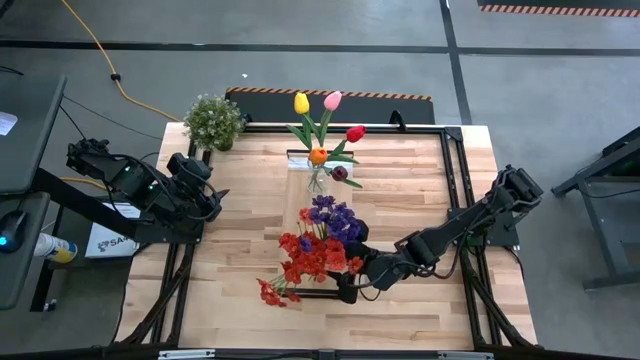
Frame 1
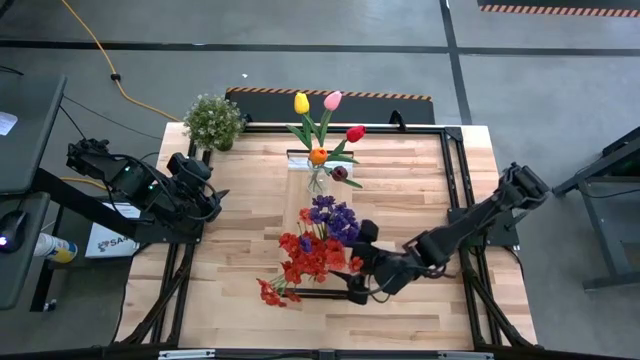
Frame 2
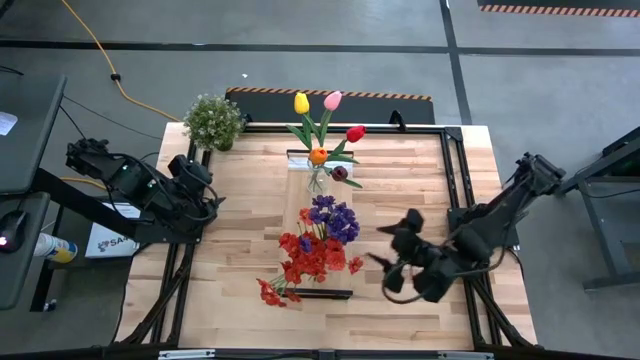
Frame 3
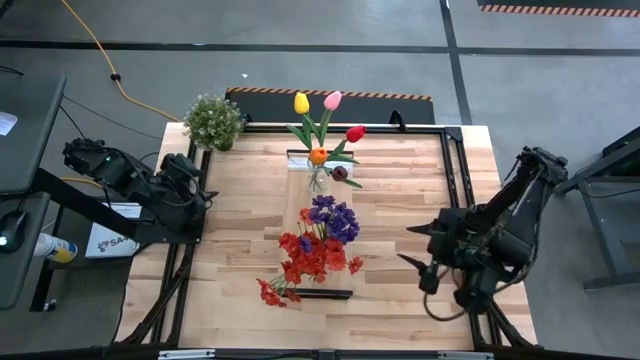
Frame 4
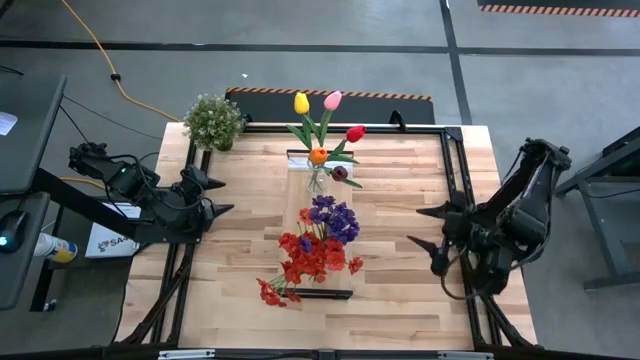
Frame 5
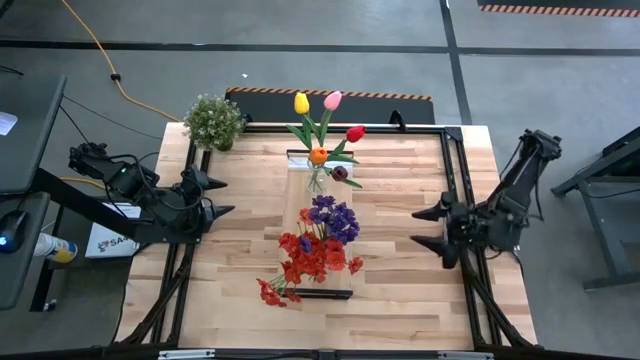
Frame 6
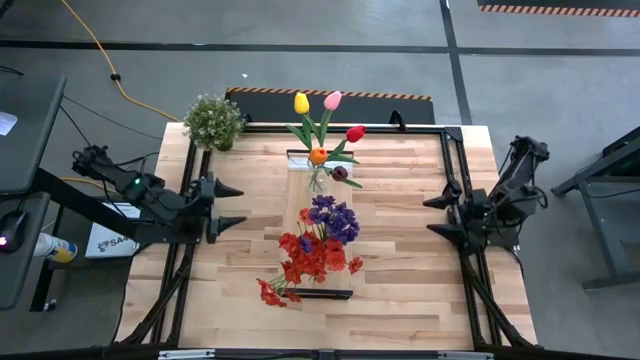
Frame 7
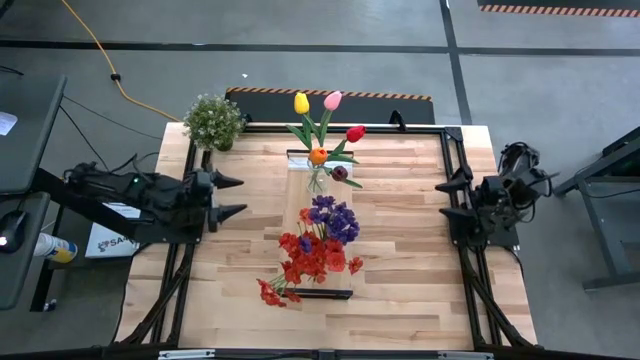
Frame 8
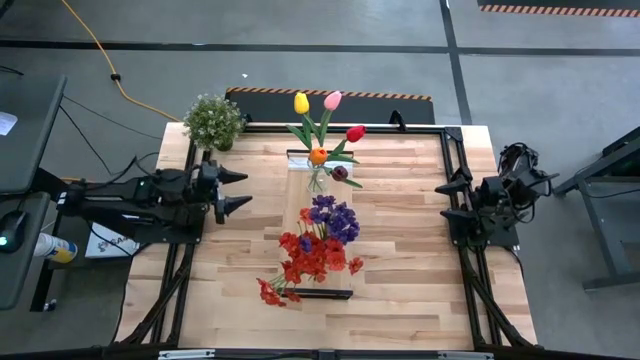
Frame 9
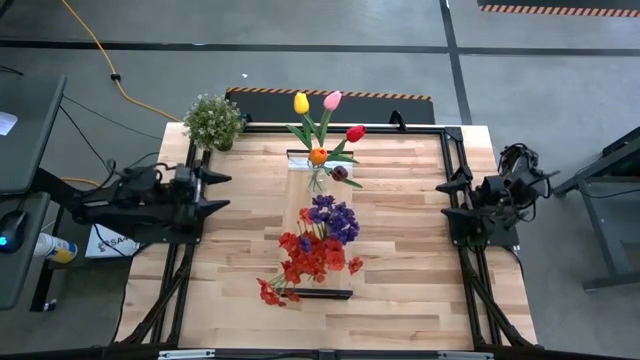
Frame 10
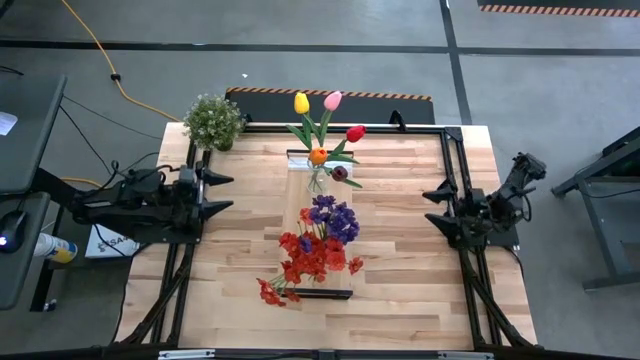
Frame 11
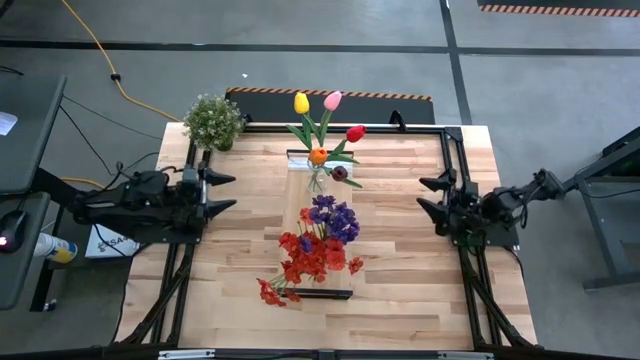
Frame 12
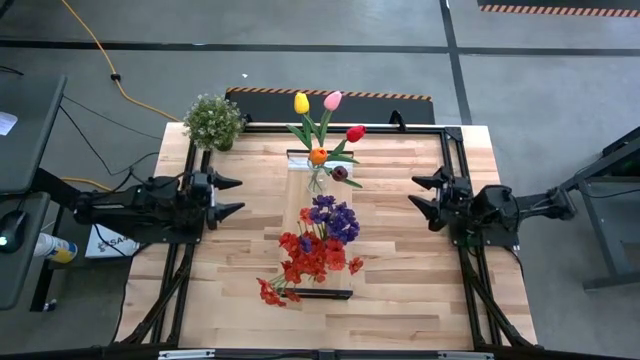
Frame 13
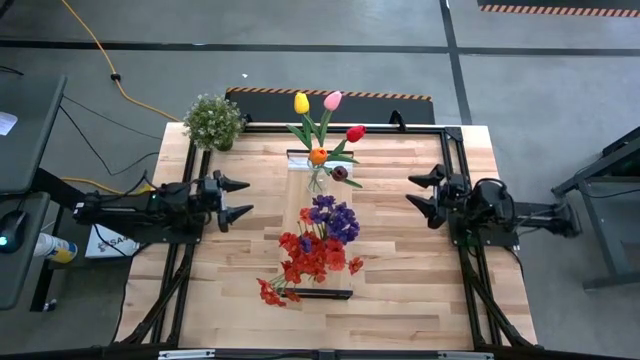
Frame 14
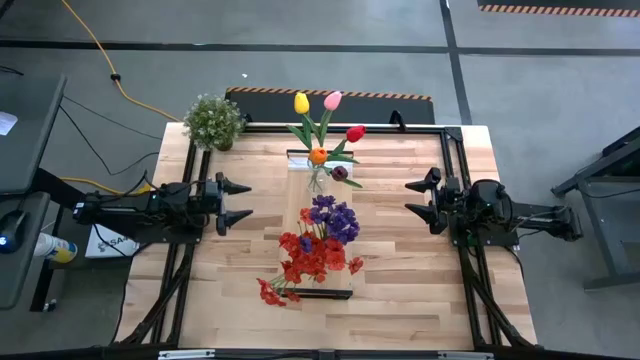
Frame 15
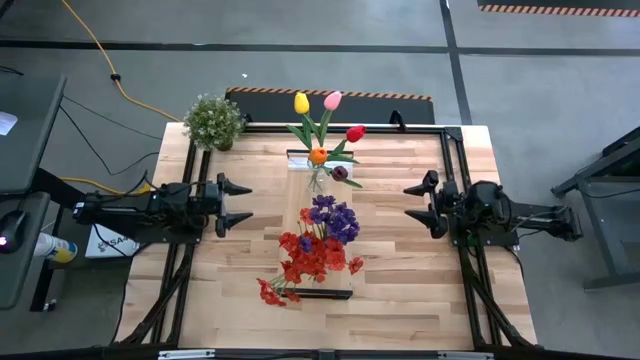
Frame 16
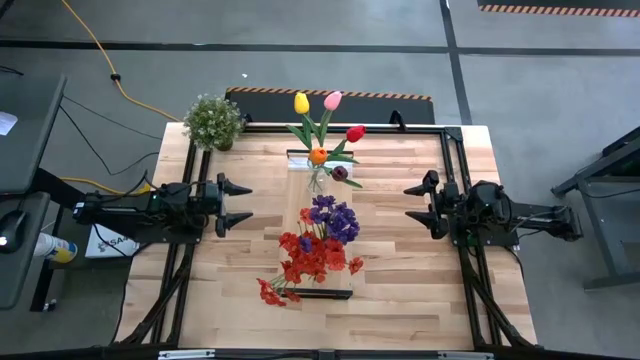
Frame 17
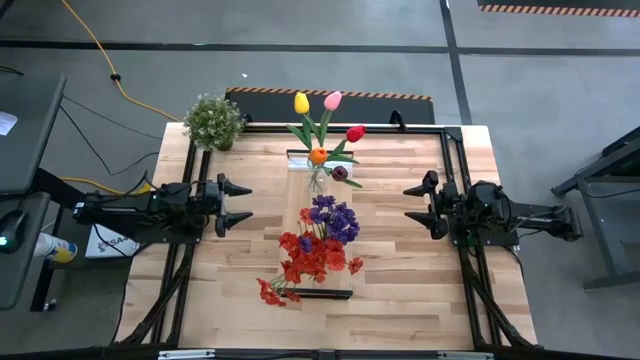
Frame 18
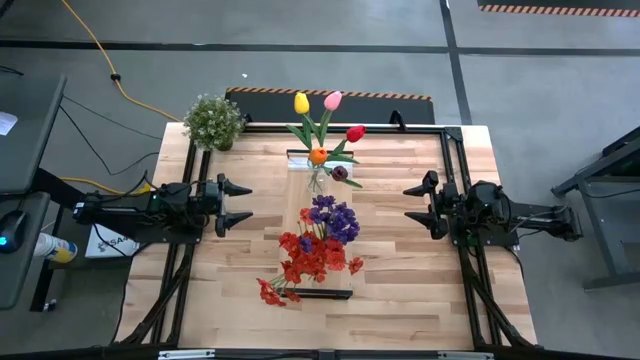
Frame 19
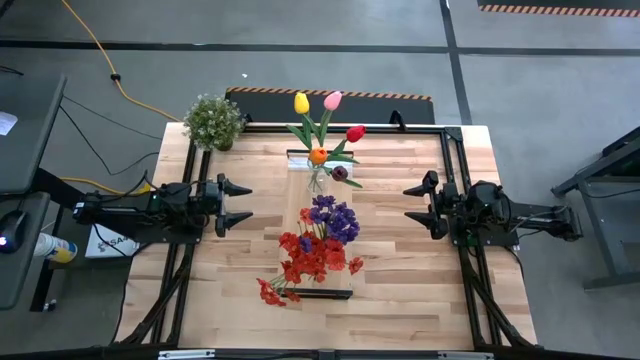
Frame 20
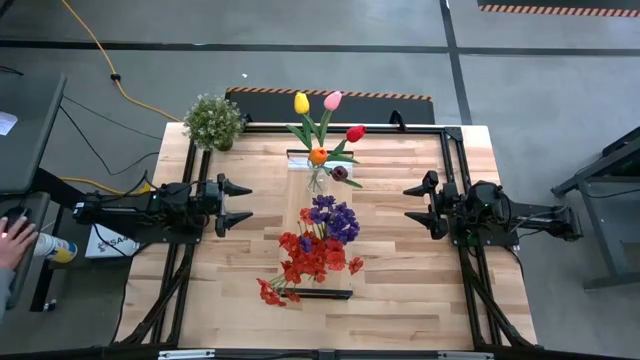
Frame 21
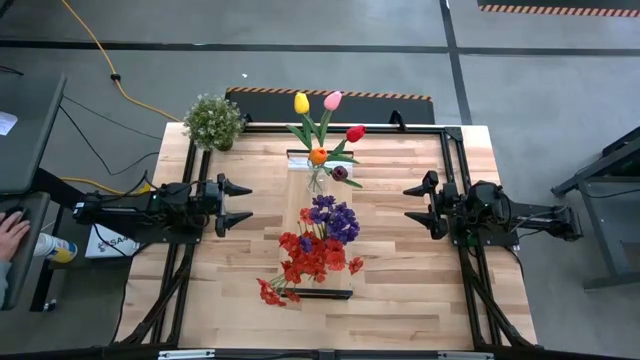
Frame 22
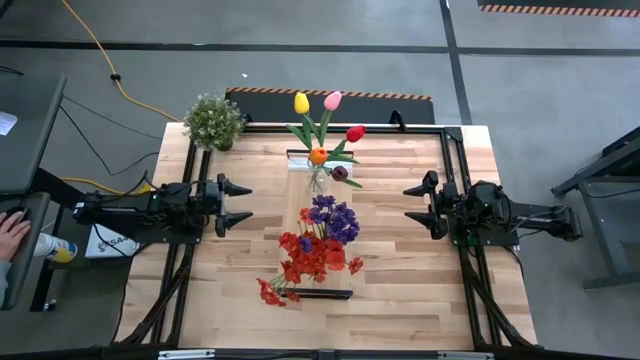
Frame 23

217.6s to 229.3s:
Task: Pick and place flowers into a vace then onto a shelf
Return to Home Position

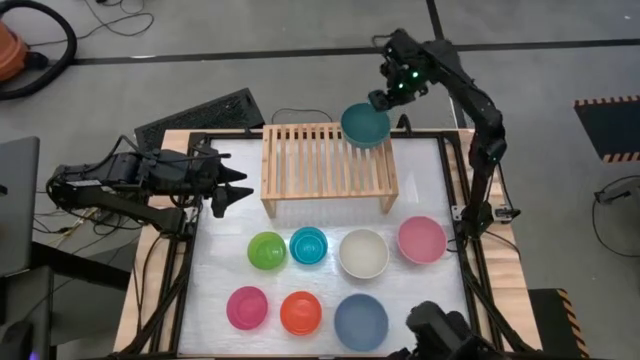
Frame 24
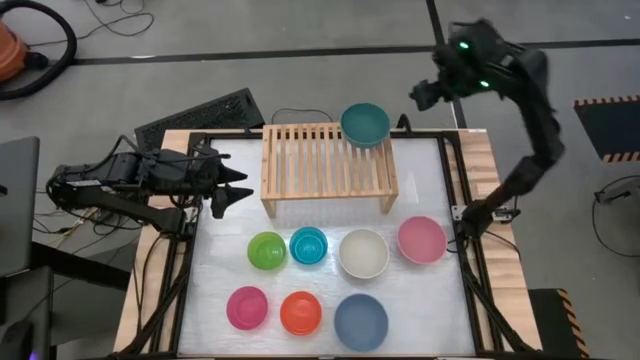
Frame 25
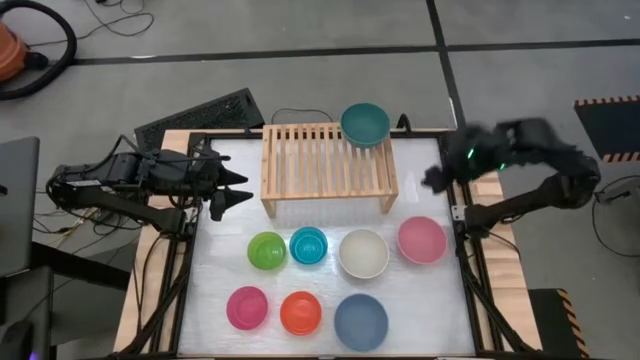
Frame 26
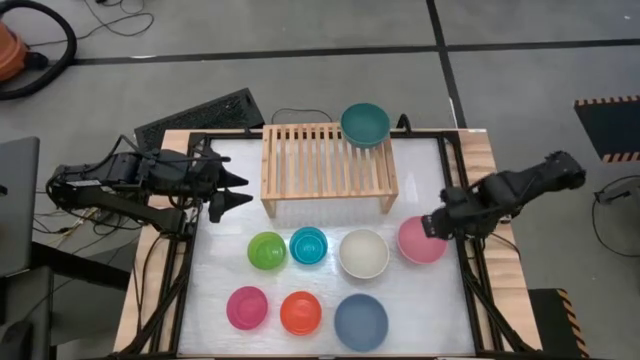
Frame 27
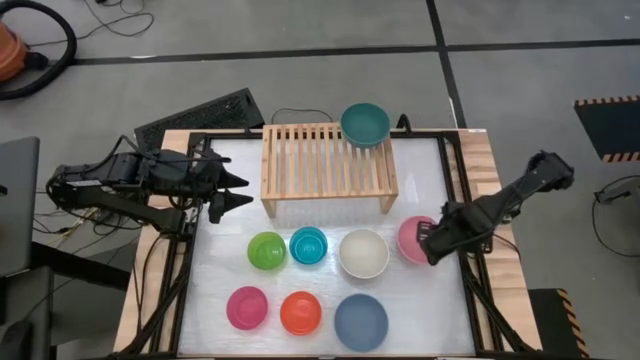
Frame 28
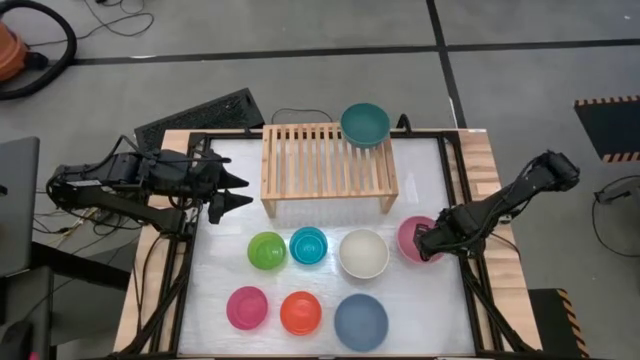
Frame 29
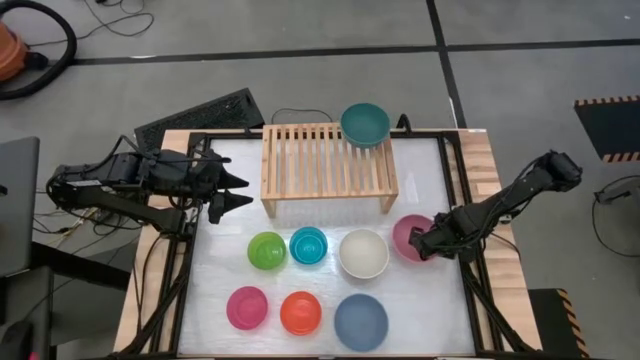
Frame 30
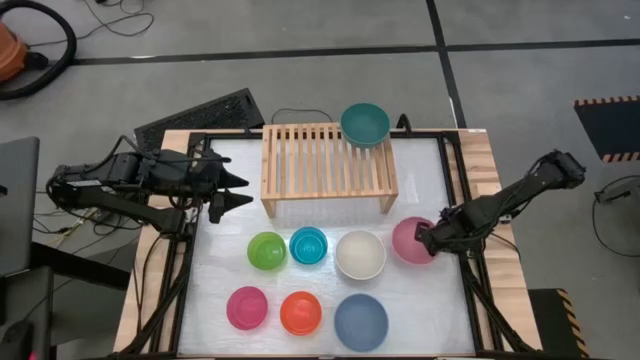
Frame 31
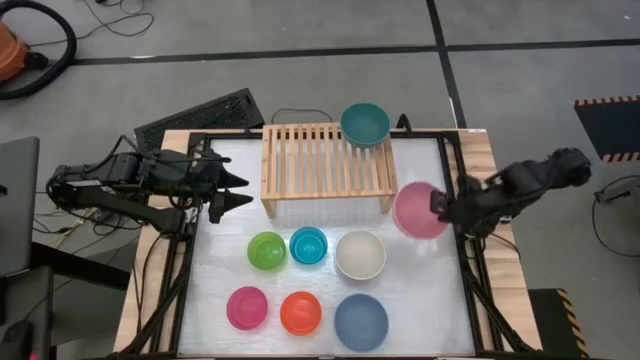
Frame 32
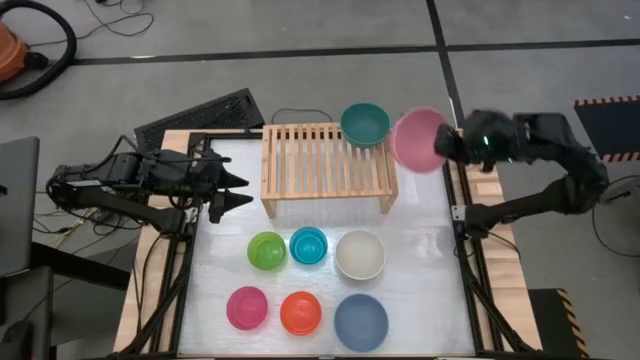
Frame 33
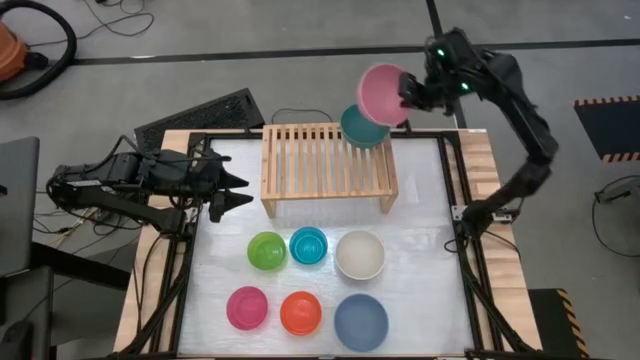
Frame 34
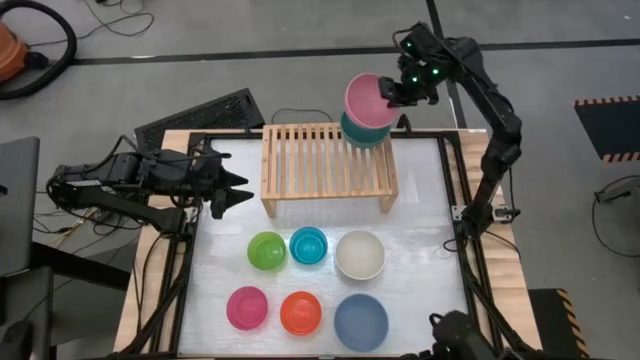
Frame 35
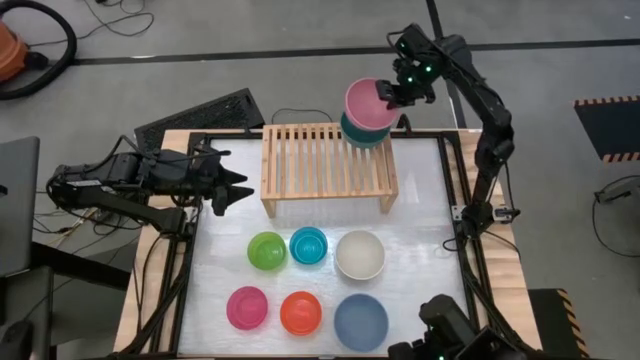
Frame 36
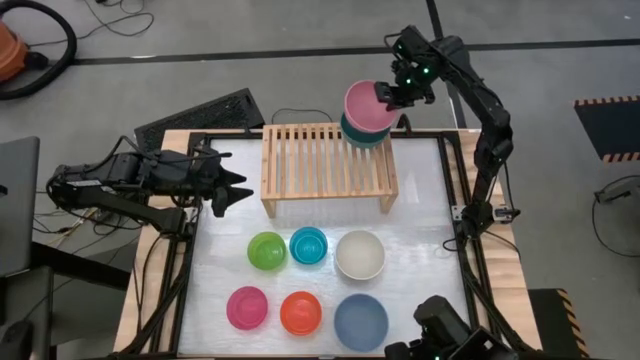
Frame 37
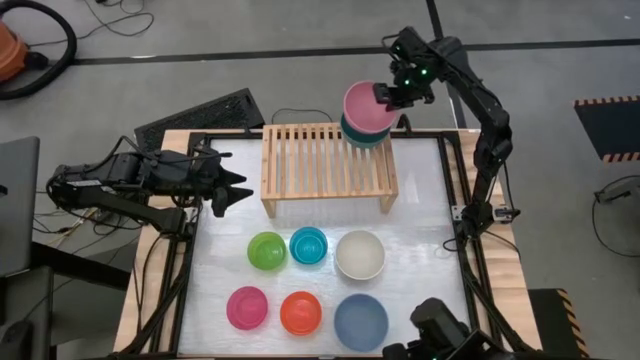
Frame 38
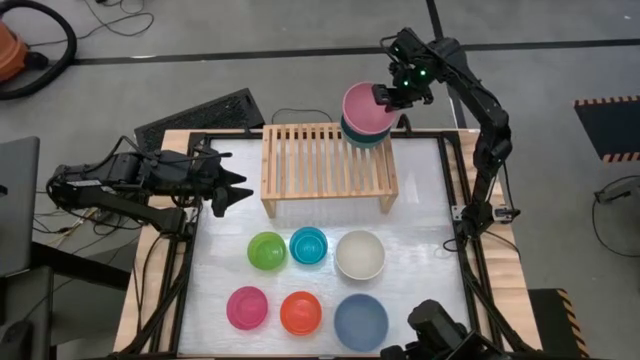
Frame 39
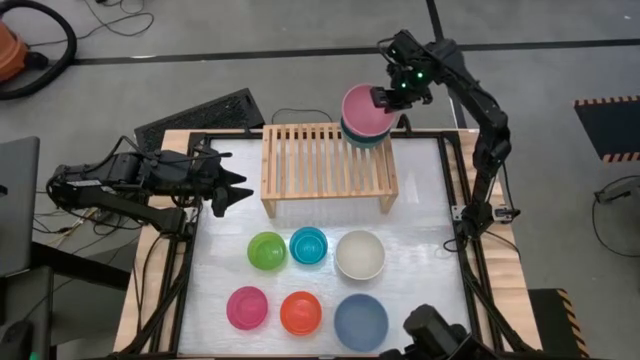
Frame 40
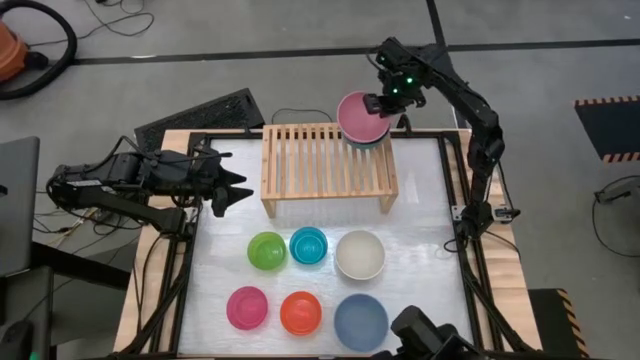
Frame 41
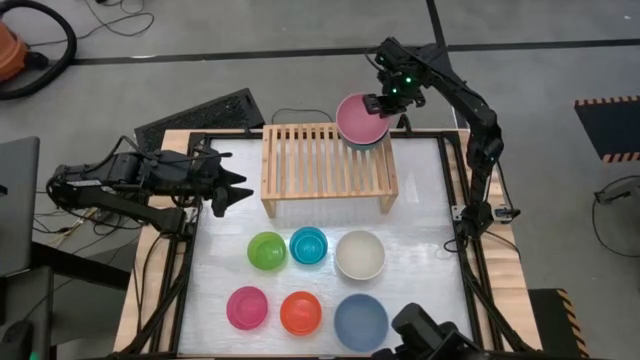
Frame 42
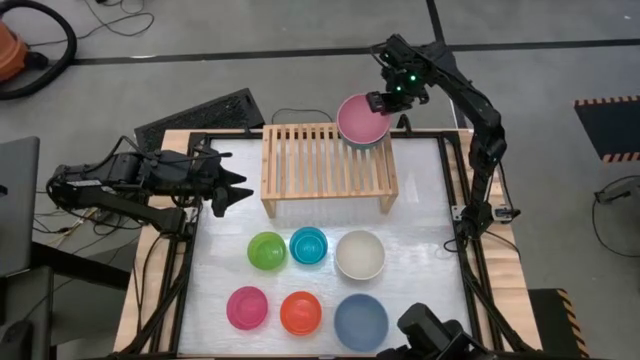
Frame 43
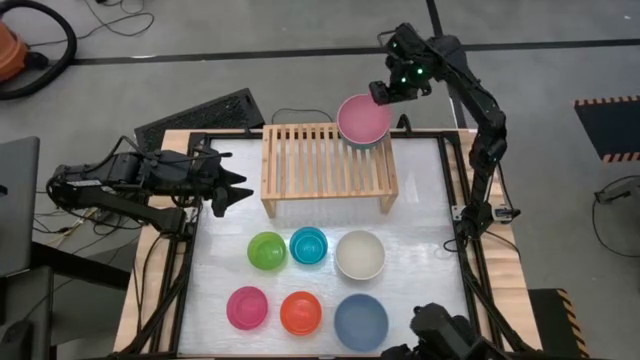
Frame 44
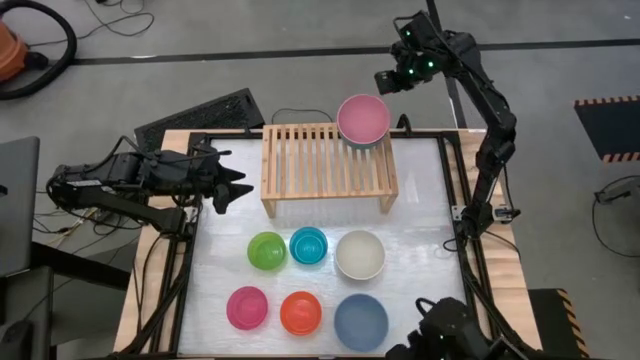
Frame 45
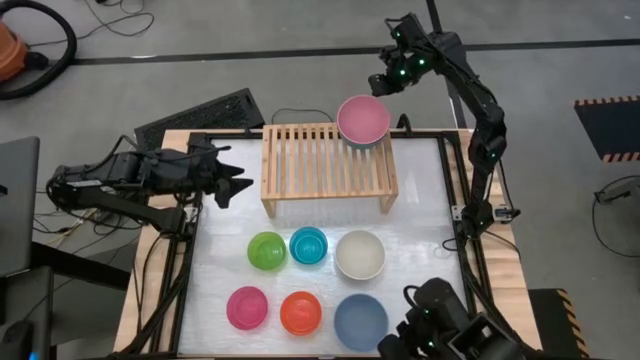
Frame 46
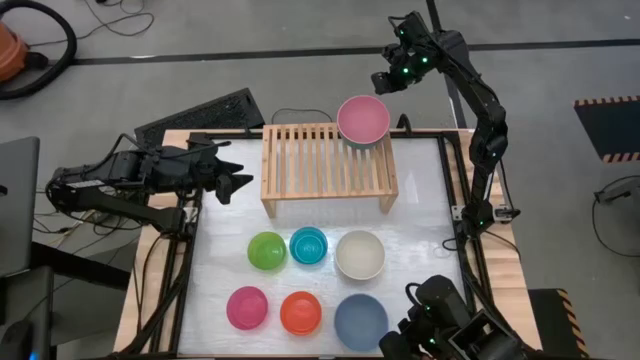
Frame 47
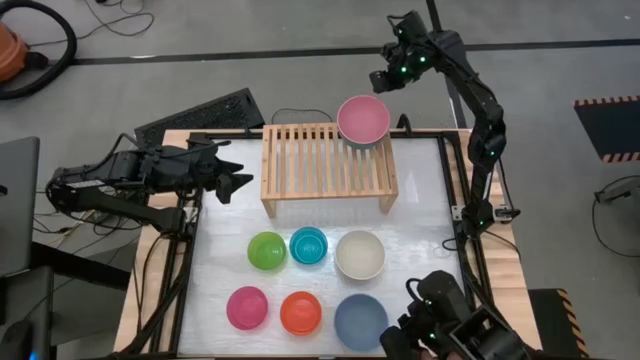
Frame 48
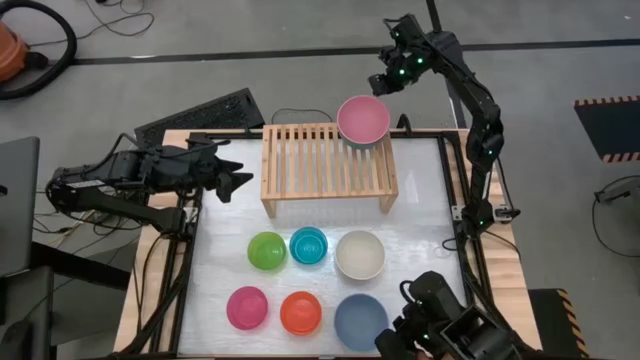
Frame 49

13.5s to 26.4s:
Task: Place and stack bowls onto a shelf
Stack the large pink bowl on top of the large dark blue bowl on the shelf
